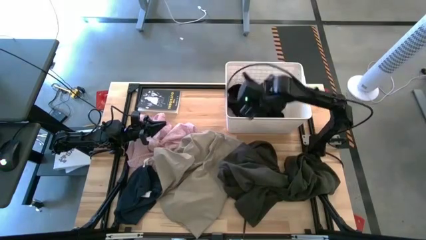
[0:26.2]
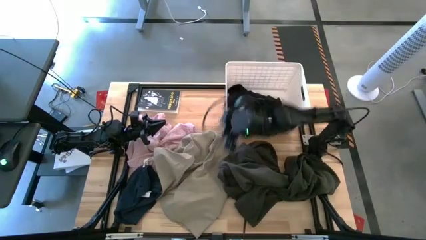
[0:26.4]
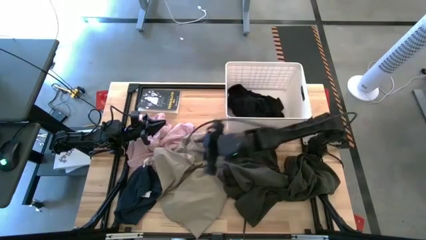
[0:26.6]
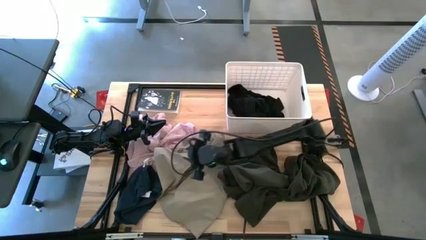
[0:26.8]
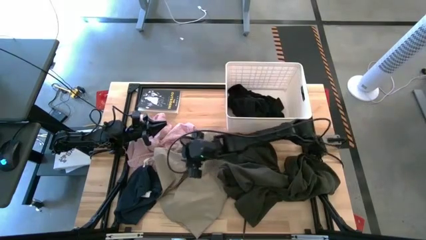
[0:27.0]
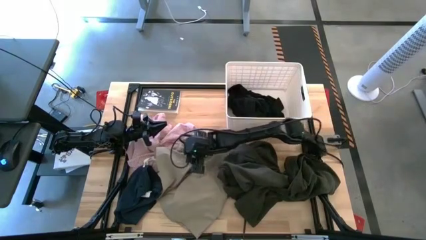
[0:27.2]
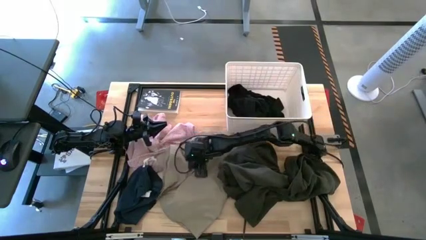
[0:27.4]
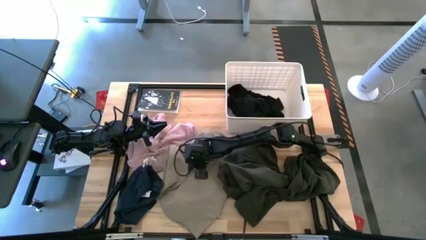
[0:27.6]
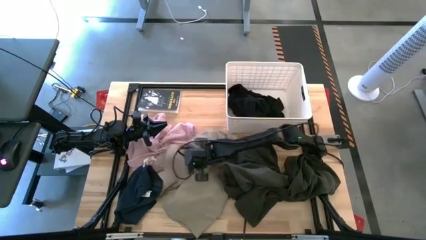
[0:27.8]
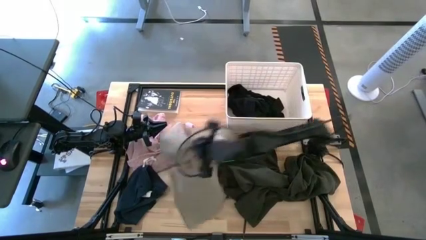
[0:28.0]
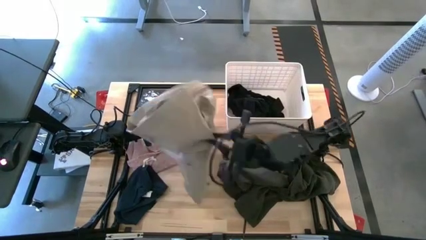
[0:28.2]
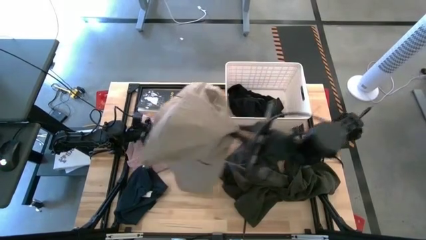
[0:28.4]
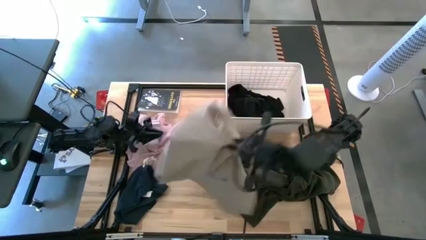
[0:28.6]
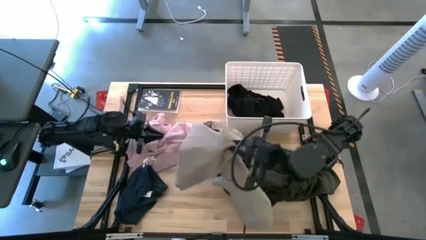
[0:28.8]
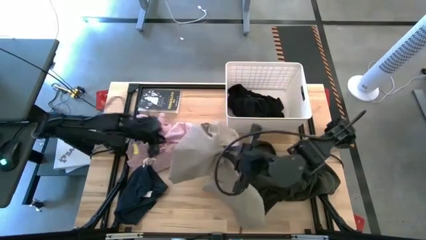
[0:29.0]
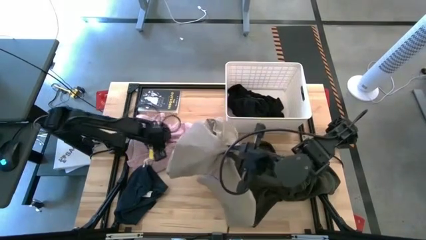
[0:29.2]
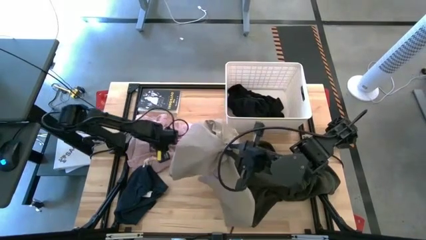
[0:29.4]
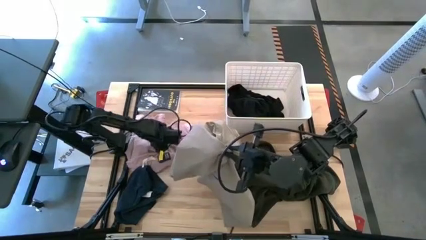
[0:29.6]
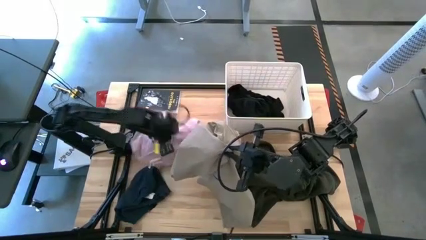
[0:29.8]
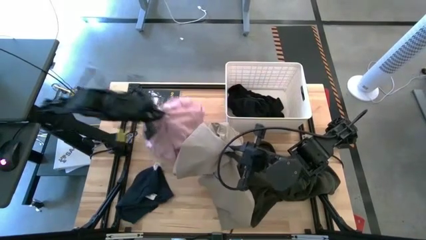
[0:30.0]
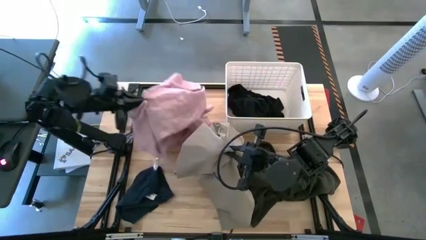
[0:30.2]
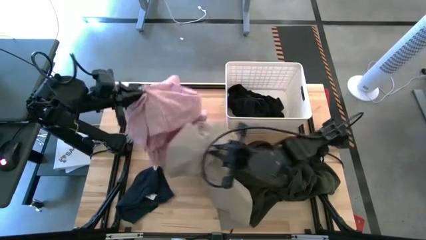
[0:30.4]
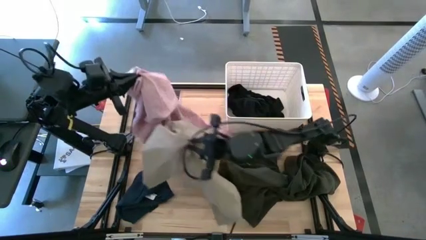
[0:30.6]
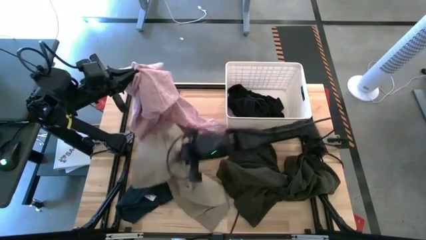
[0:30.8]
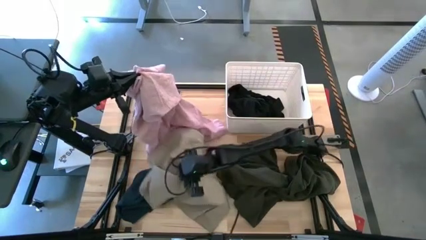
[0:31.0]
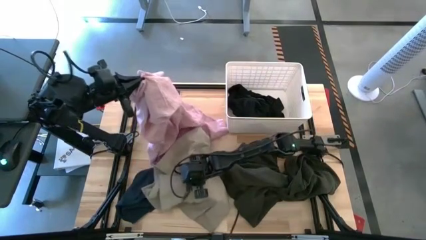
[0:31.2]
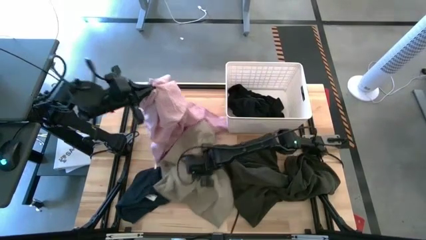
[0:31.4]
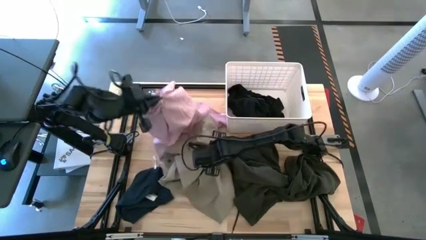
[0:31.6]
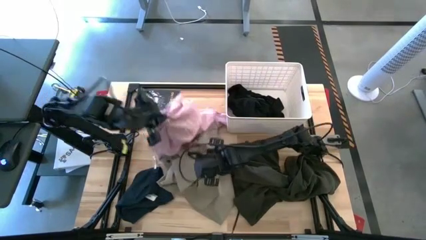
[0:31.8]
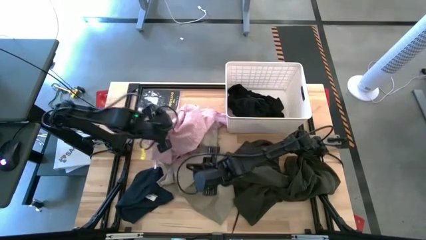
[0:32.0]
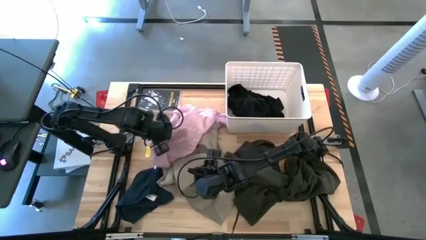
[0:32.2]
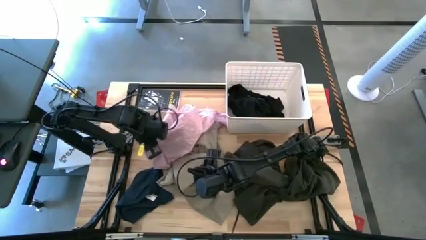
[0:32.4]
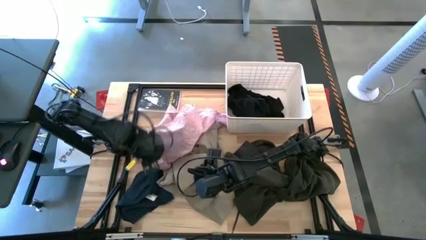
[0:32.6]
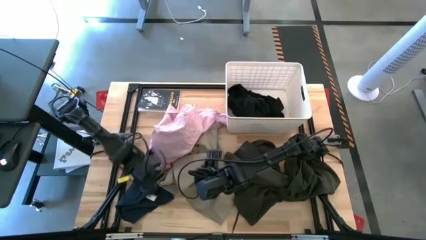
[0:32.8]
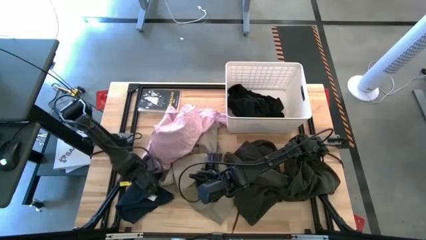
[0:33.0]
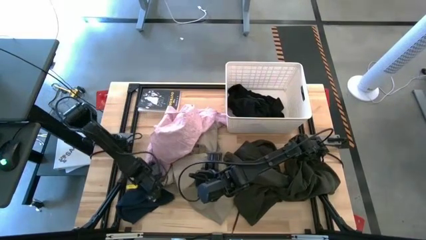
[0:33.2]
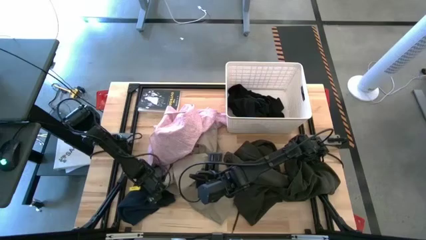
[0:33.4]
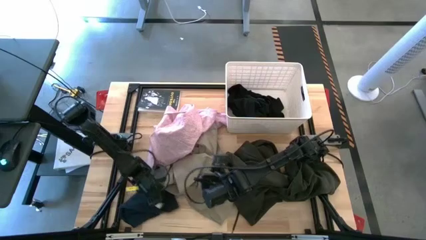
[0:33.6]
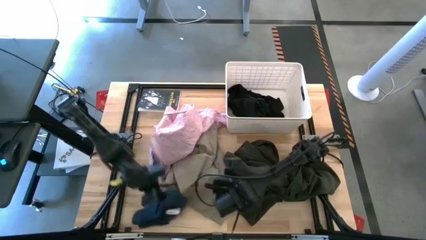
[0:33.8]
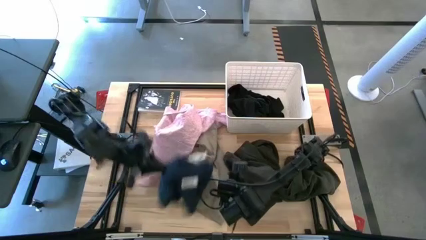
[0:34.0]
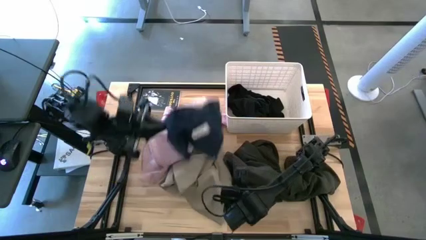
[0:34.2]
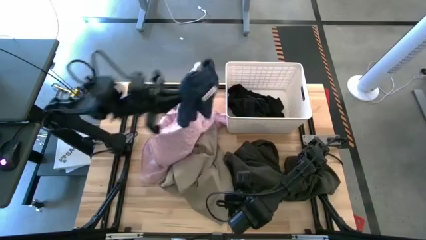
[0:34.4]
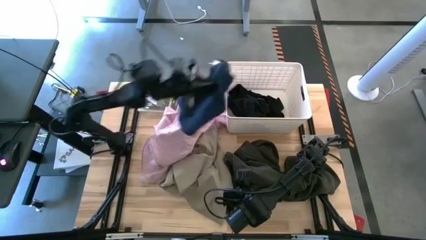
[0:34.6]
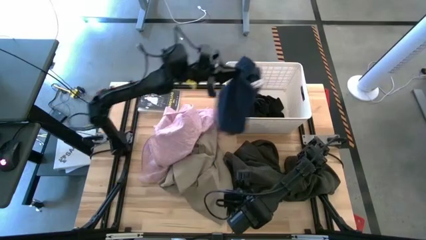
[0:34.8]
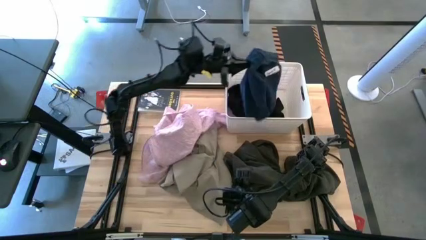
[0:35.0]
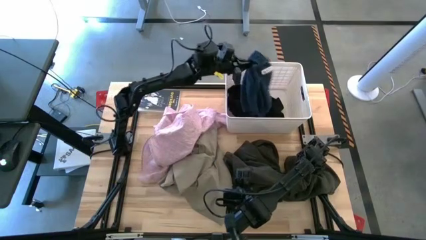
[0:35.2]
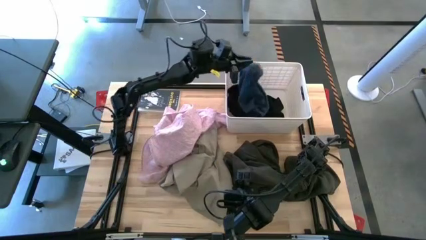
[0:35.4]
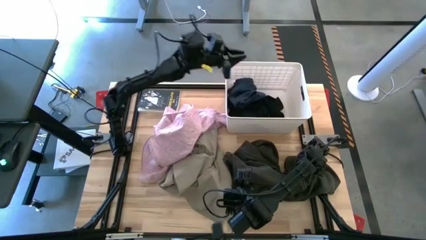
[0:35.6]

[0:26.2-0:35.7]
Task: Sort clothes
Put the blue shorts into the laundry bin

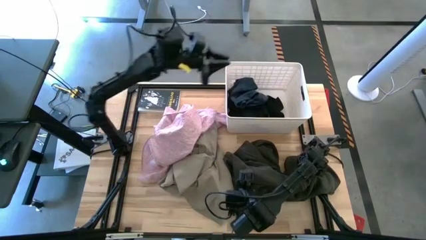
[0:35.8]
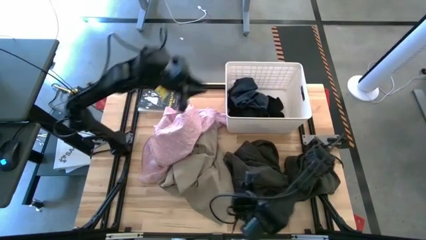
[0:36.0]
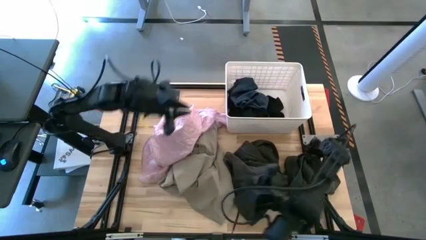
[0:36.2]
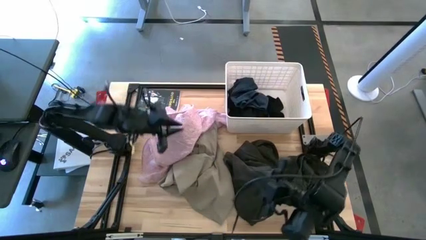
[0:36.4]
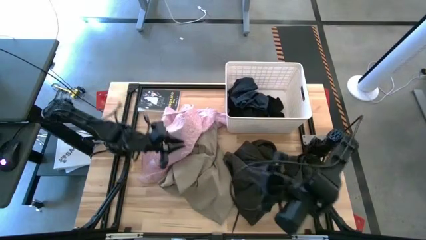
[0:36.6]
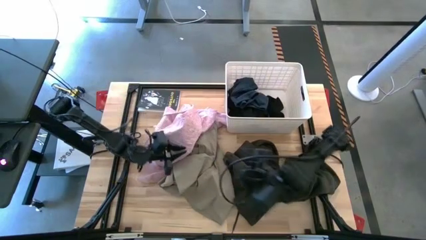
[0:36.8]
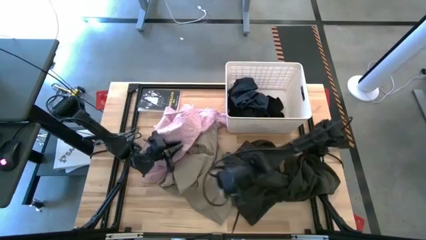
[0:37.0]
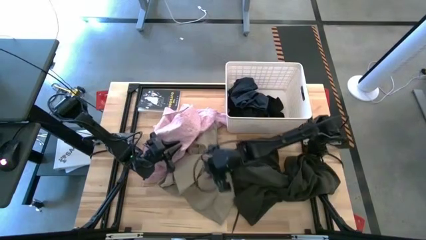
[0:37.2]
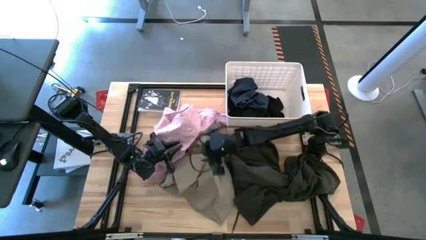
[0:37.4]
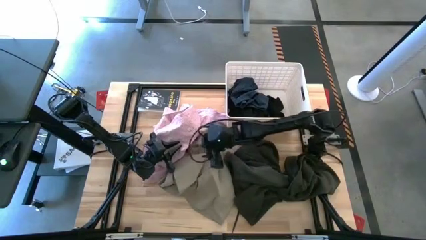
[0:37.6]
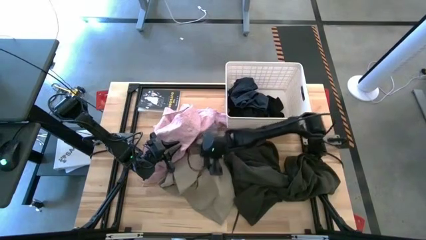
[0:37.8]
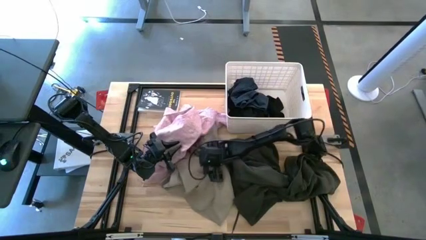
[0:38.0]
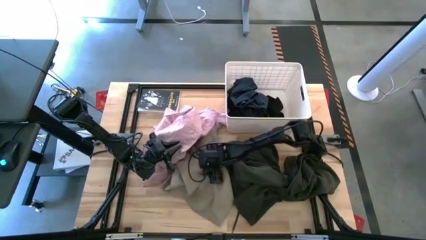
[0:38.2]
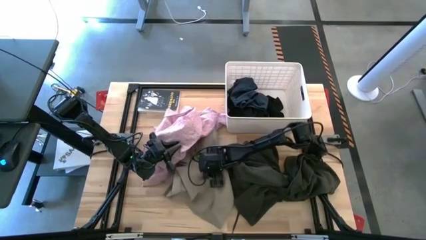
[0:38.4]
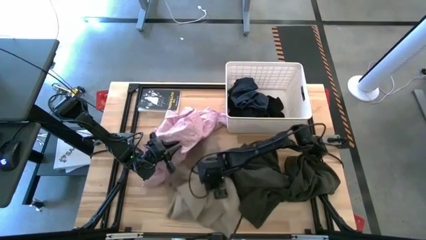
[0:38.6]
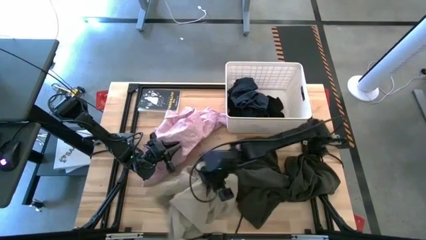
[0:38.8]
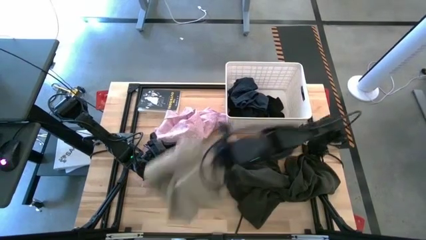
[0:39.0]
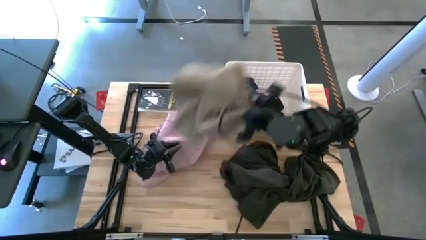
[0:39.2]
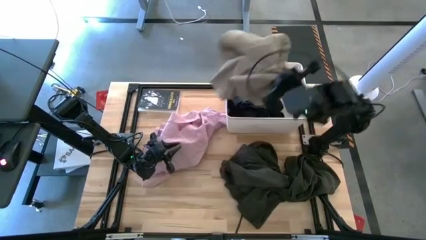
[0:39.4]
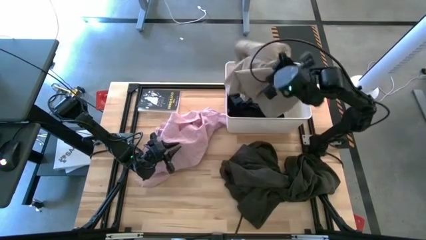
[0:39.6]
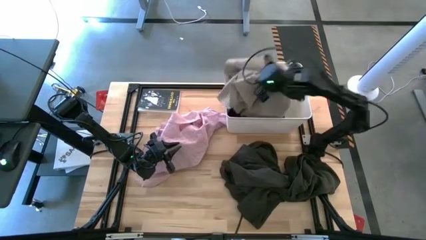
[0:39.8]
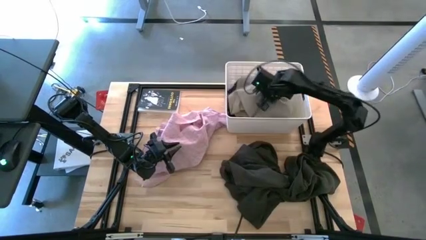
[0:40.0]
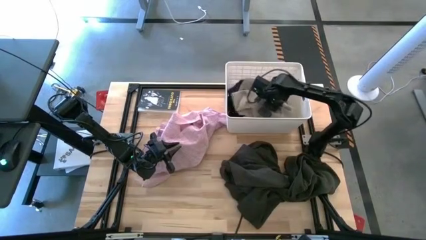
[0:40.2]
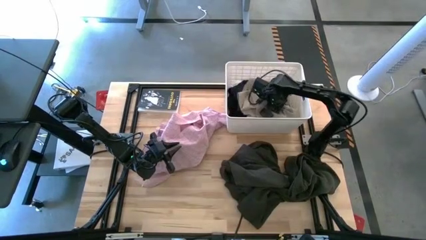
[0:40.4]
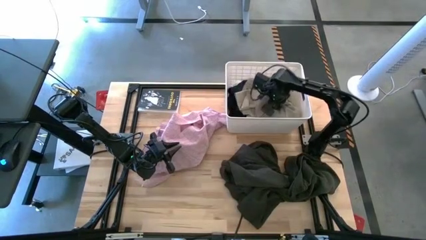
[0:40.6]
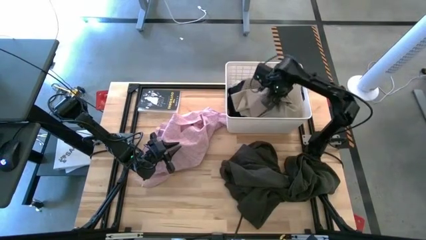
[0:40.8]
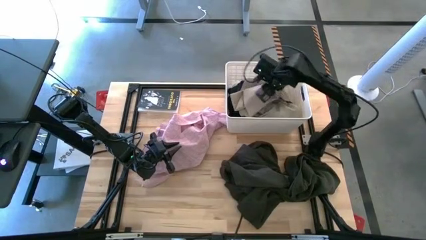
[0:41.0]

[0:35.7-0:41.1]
Put the brown shirt into the laundry bin
